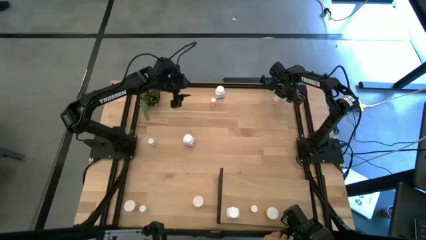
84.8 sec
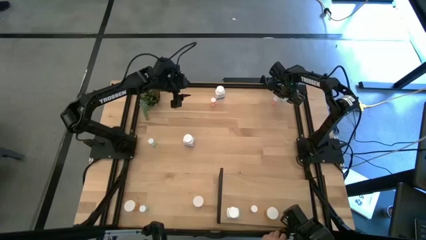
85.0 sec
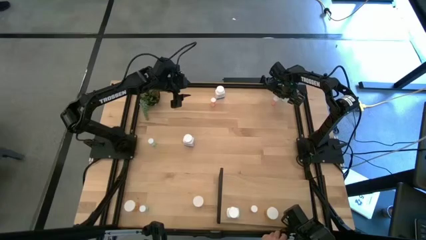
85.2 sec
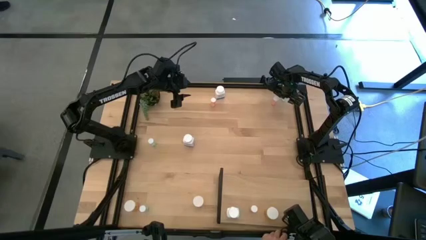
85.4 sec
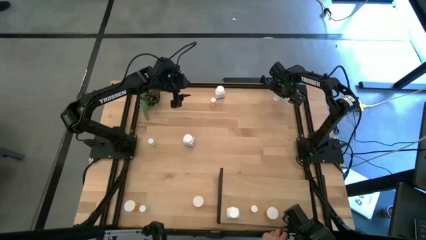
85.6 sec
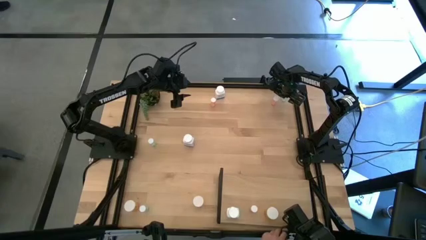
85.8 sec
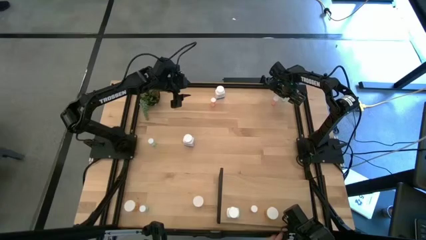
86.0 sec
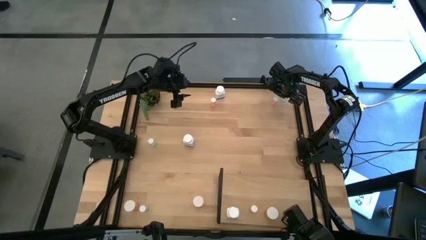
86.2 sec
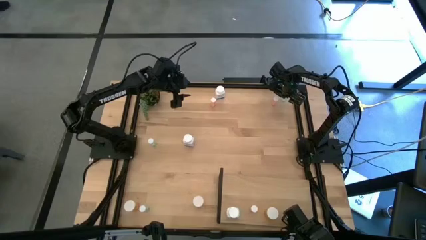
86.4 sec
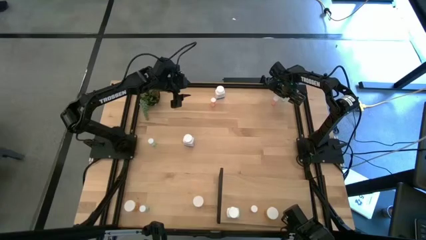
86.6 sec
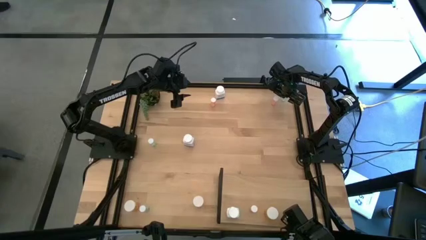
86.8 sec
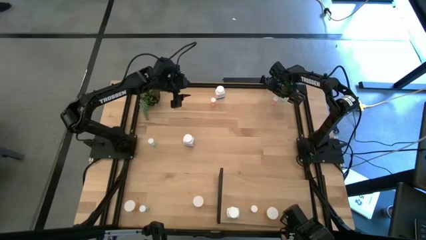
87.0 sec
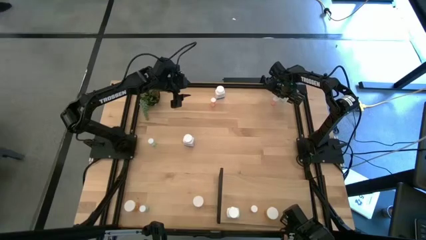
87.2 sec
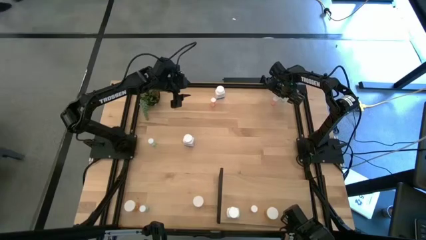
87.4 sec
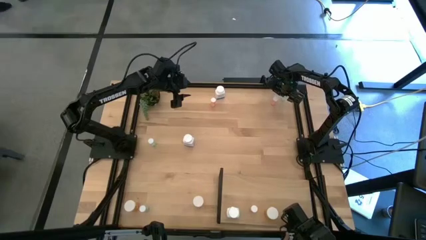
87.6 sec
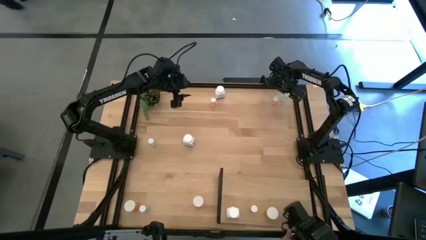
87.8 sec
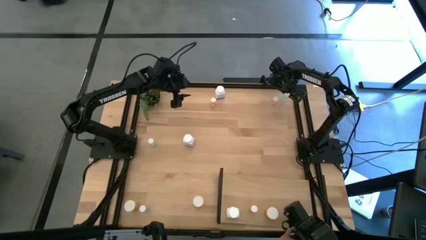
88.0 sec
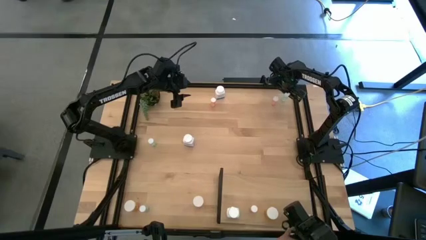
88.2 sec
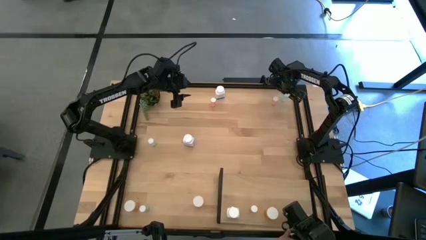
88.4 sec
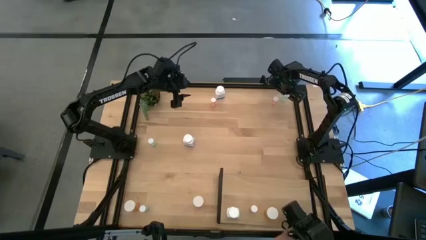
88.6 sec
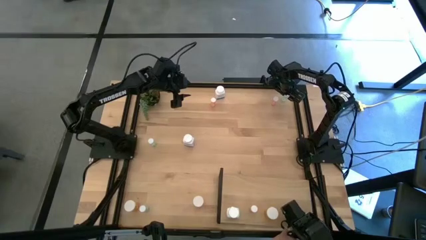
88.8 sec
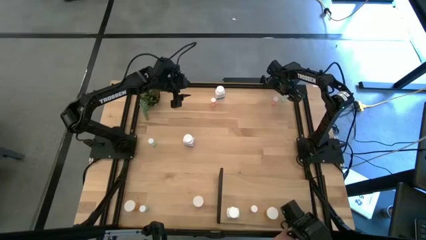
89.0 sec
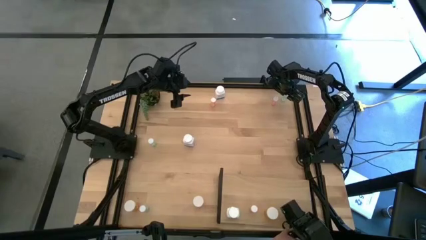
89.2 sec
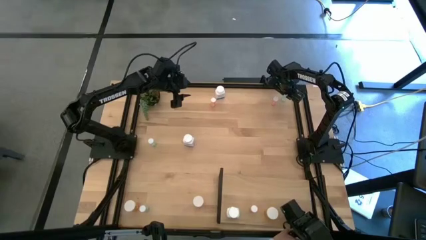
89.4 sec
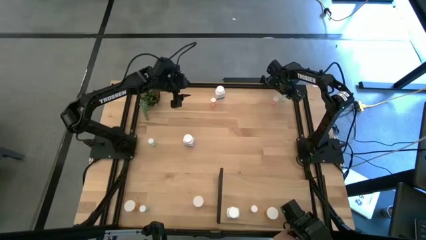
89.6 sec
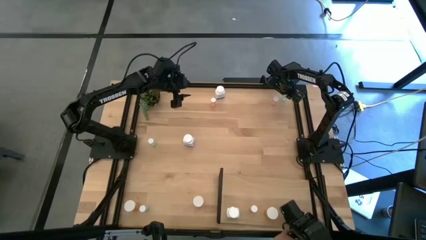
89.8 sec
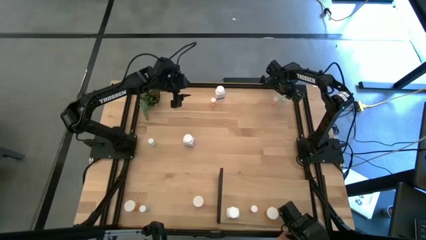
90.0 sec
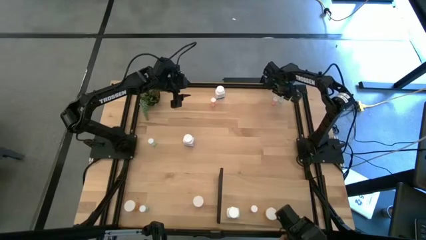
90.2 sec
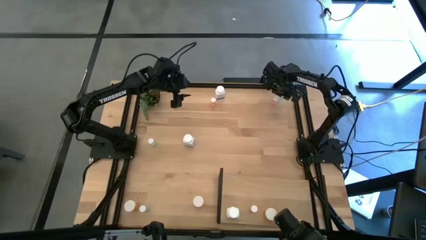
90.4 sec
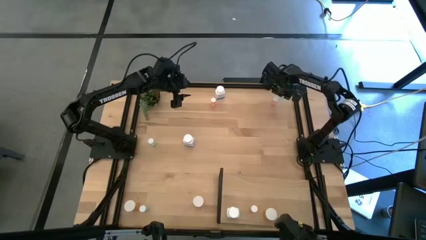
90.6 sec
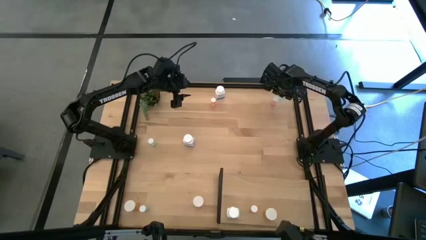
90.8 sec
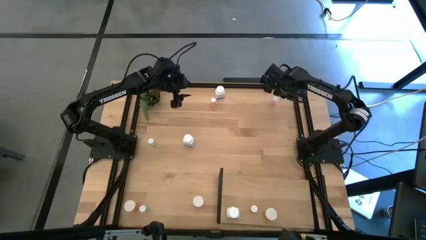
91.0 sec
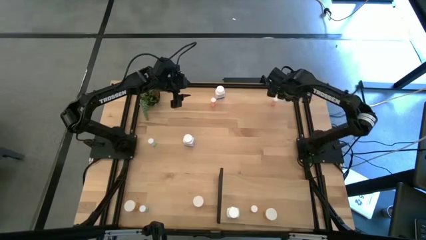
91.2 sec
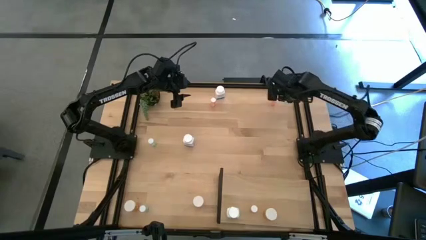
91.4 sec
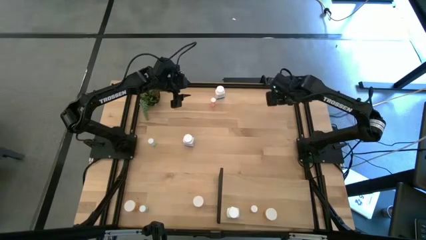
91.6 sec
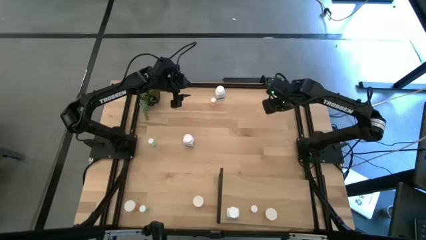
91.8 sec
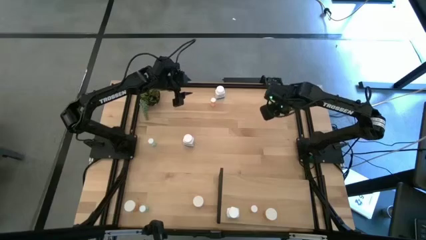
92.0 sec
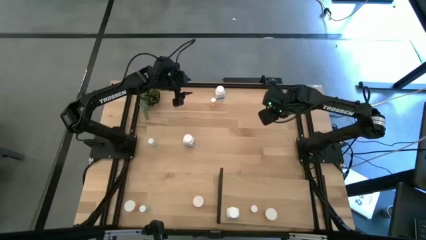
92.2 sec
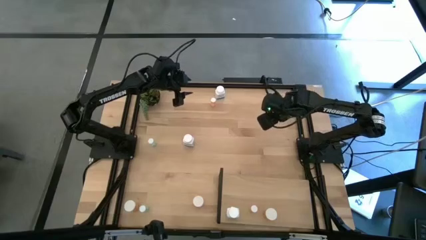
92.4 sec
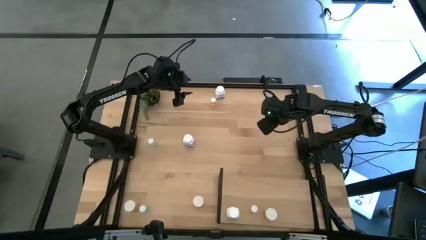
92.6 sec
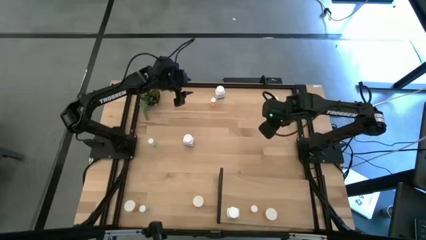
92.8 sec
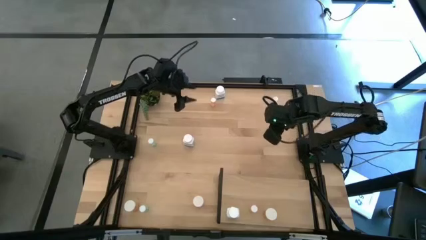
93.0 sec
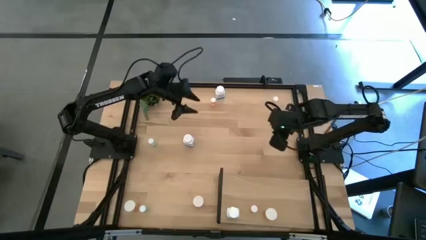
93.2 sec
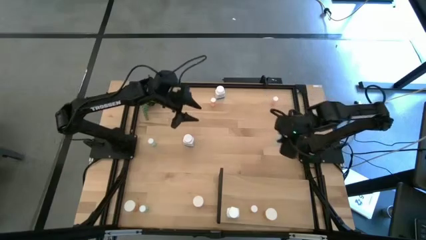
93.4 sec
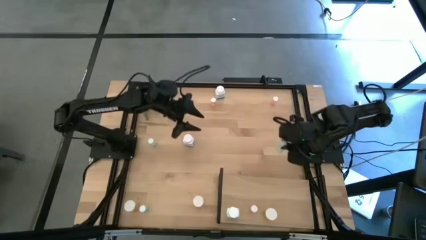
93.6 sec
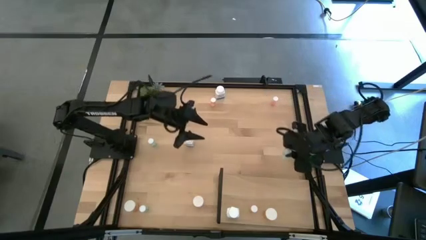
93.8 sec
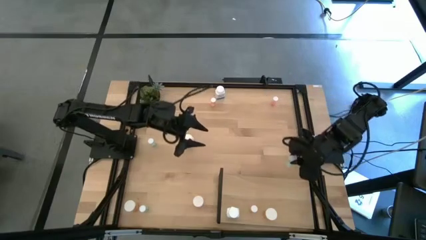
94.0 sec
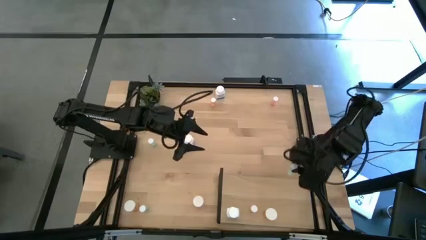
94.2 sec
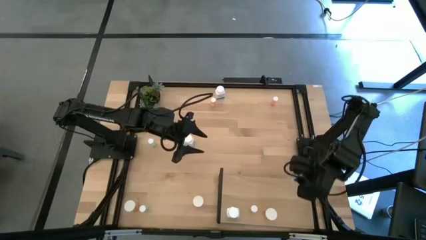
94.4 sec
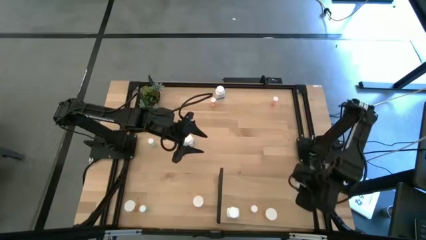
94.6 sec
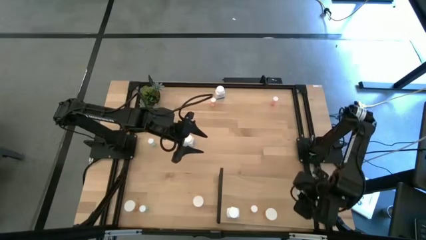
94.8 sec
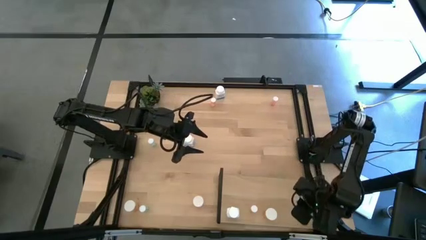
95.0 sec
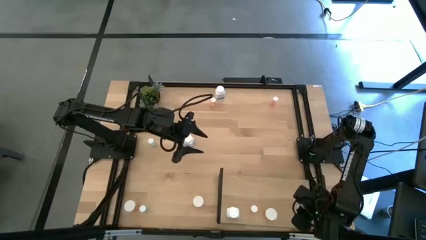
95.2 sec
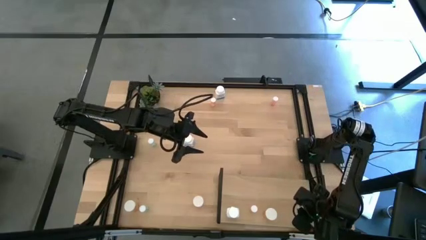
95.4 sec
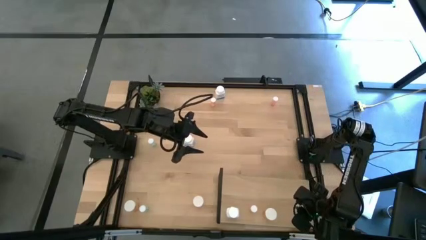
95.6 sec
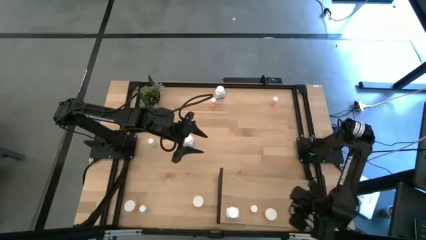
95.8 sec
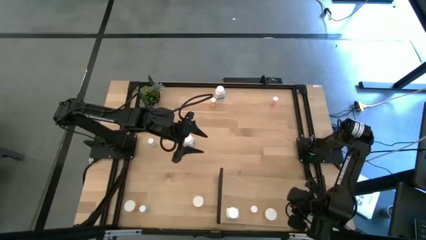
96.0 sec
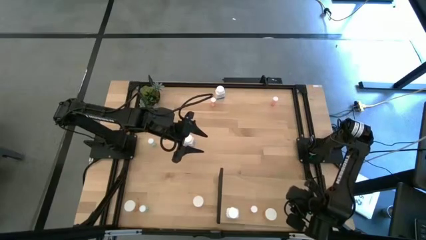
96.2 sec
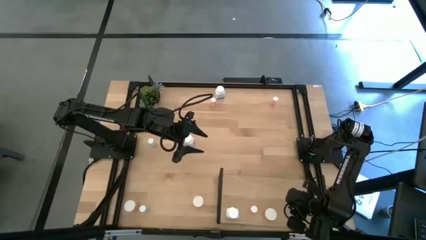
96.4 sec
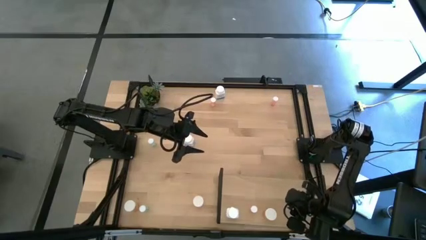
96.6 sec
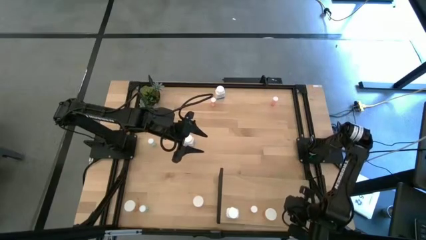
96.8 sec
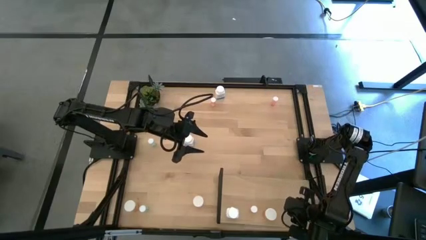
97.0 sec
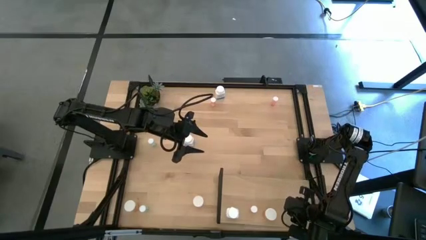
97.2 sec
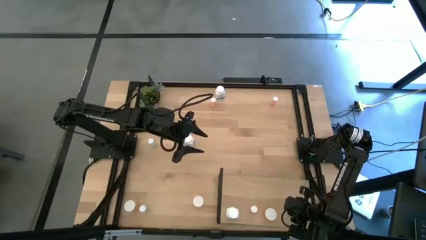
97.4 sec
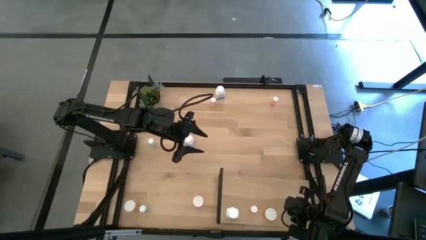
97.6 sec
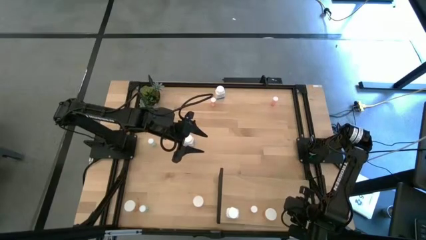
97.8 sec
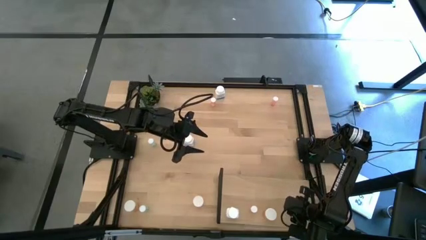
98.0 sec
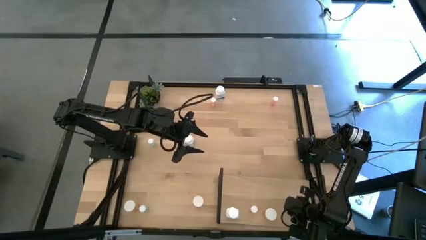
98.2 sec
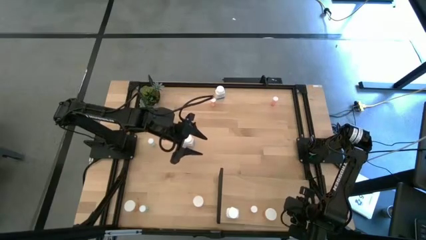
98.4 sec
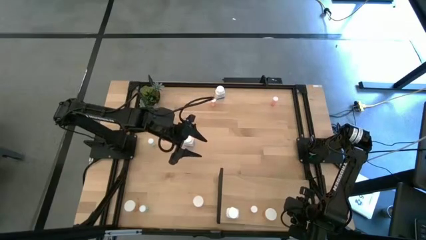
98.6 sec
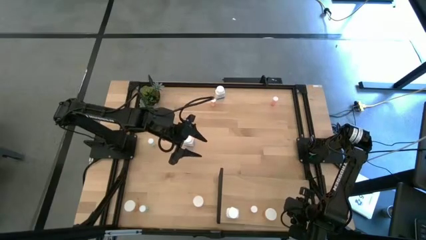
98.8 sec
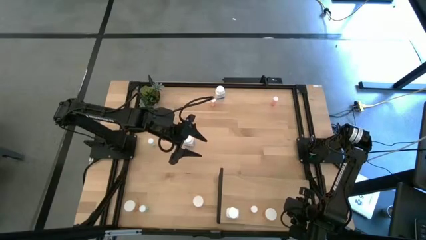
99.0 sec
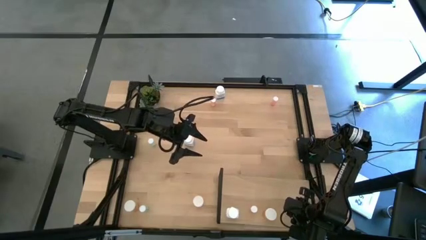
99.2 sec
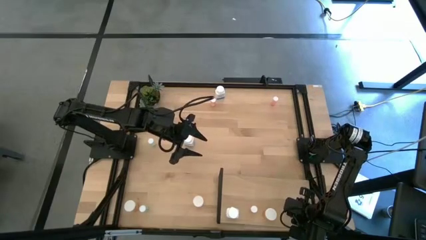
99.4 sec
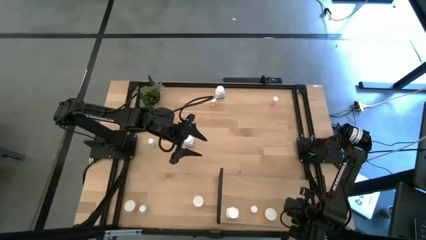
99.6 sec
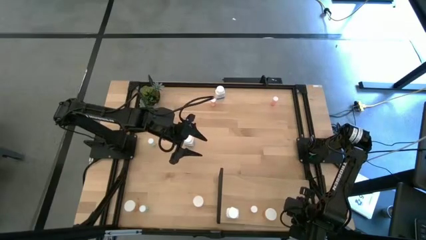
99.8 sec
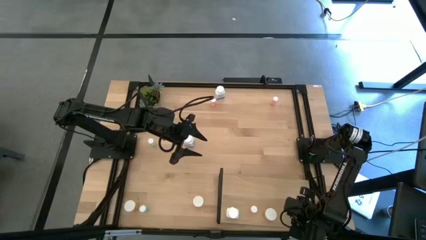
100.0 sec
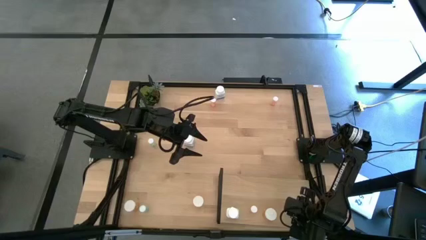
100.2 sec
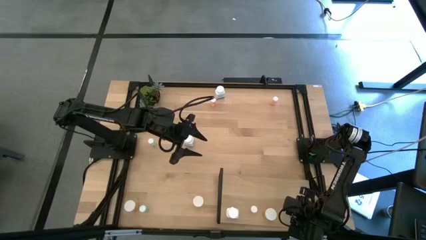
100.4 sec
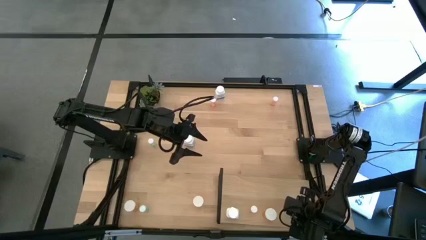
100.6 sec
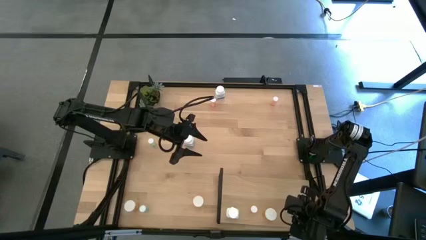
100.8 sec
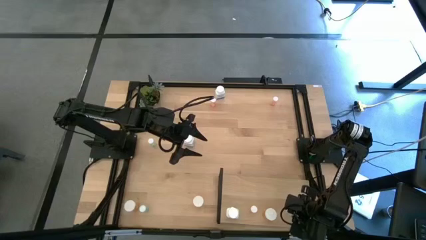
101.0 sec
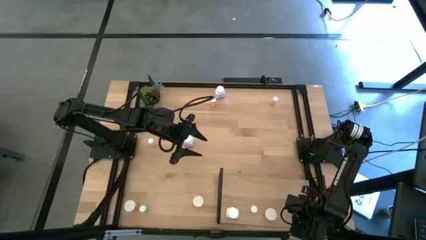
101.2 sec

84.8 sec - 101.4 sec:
Task: Pick and place medicine bottles onto shelf by color
Put the top right blue pill bottle on the shelf
